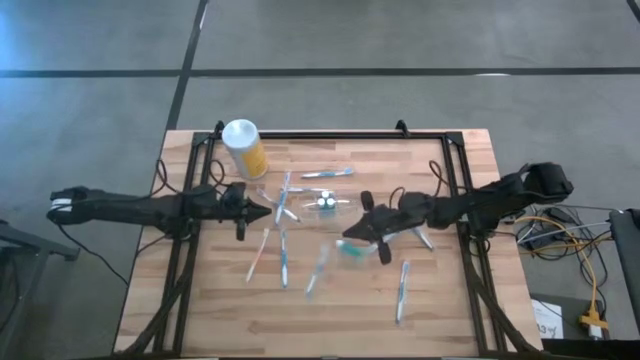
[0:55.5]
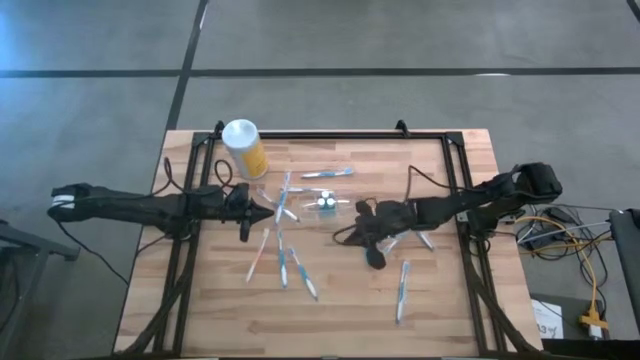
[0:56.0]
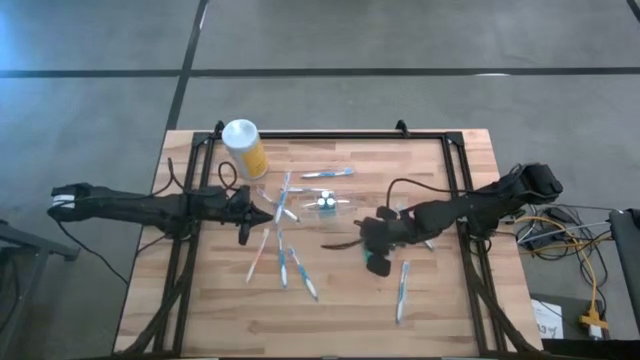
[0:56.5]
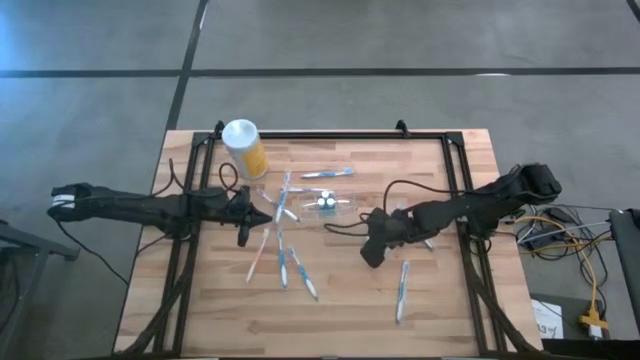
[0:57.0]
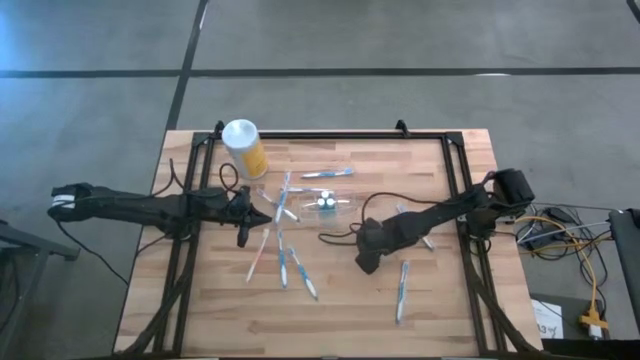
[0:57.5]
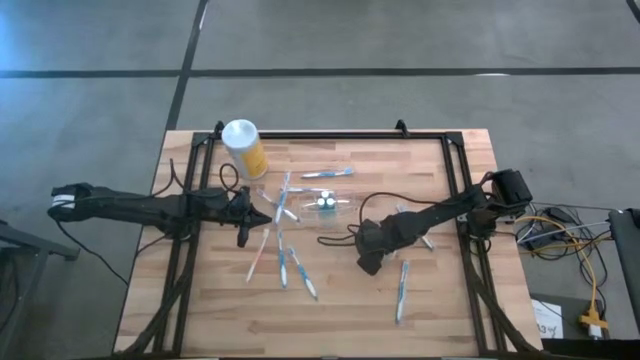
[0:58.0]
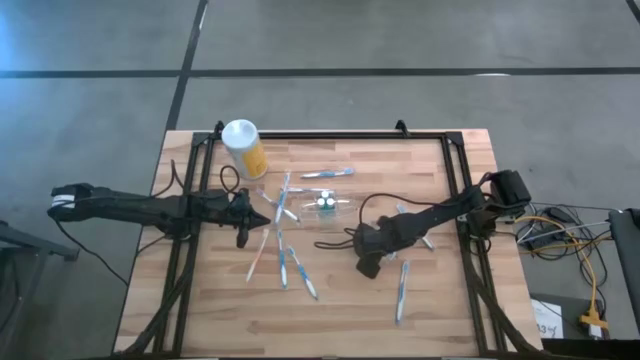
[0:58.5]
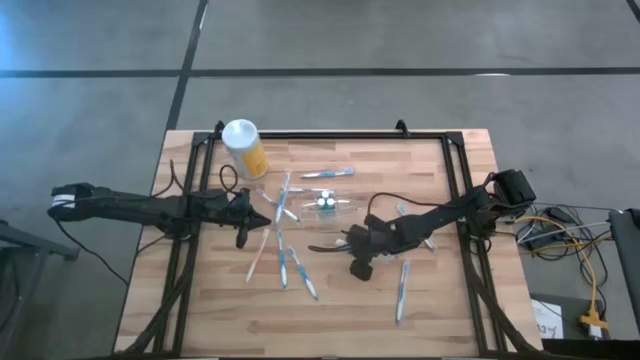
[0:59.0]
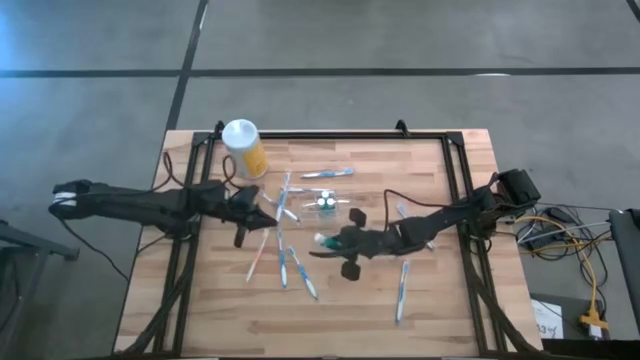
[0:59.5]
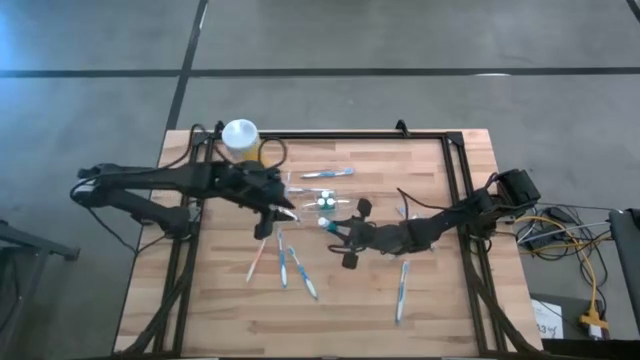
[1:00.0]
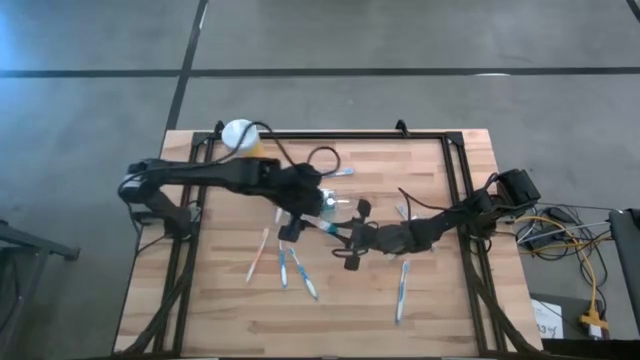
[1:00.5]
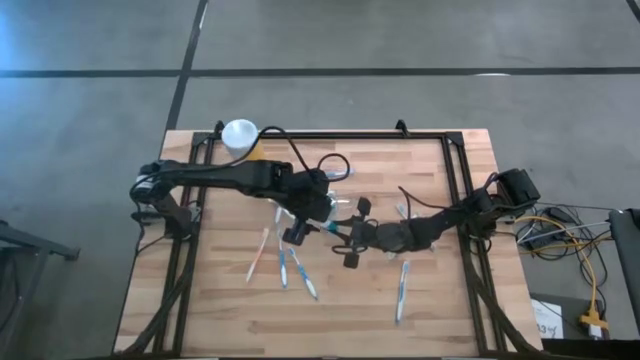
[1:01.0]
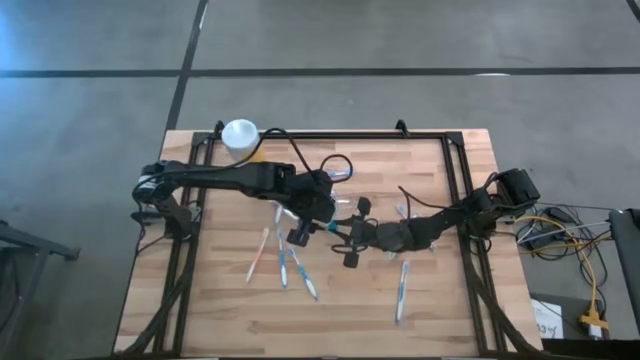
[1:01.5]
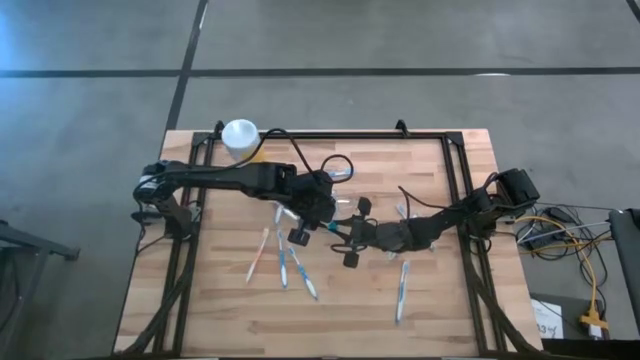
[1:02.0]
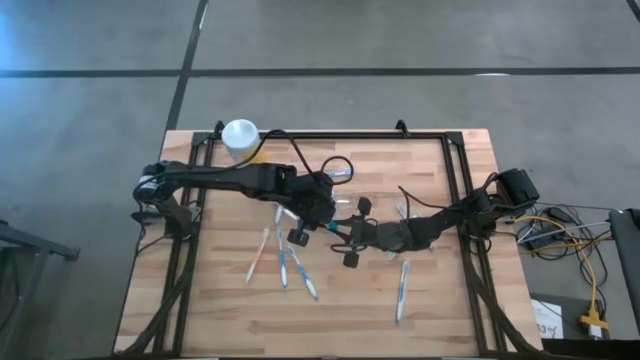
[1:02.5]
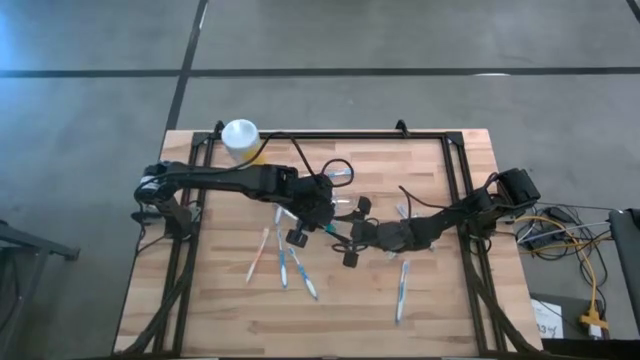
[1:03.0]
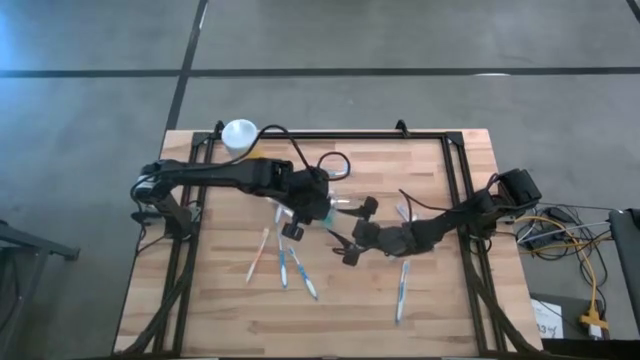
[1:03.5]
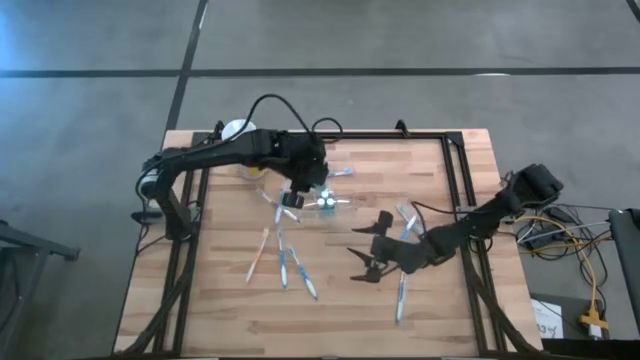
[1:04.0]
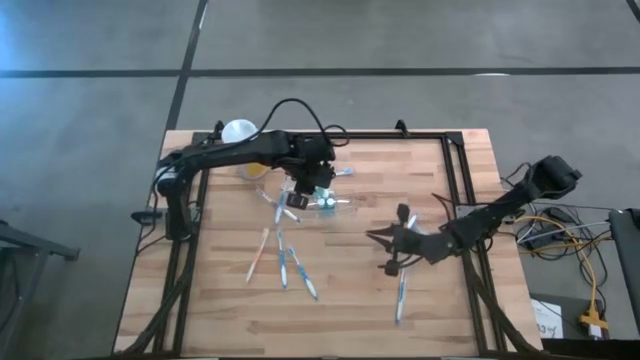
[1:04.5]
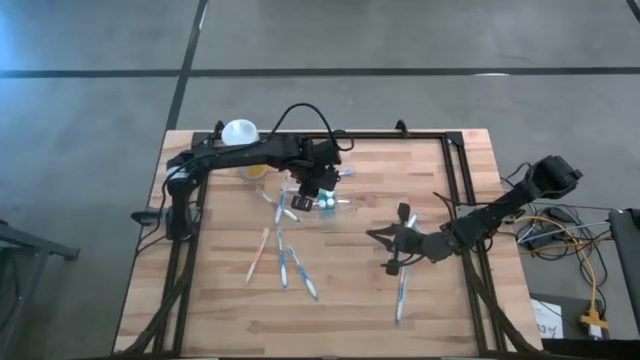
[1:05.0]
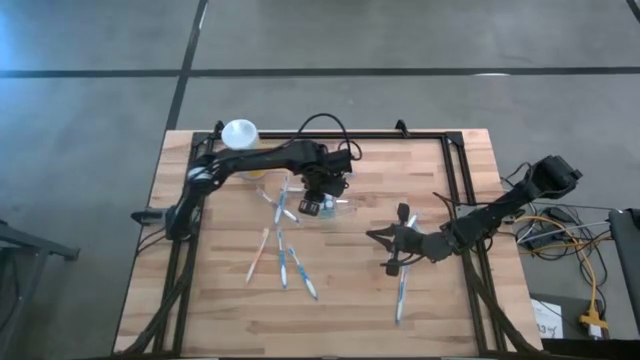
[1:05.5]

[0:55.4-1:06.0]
Task: Pick & Place toothbrushing station
Put the mouthwash into the middle section of the transparent organizer

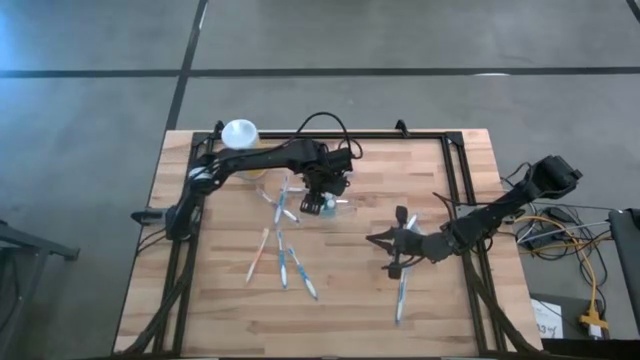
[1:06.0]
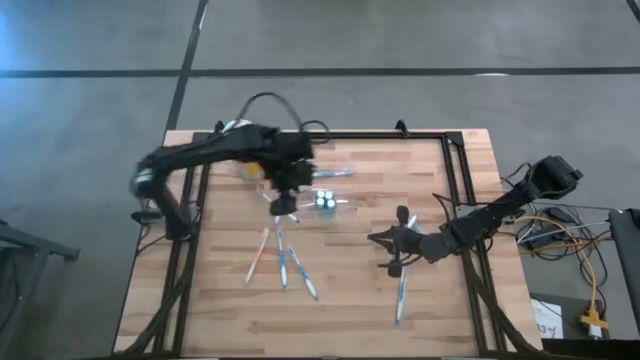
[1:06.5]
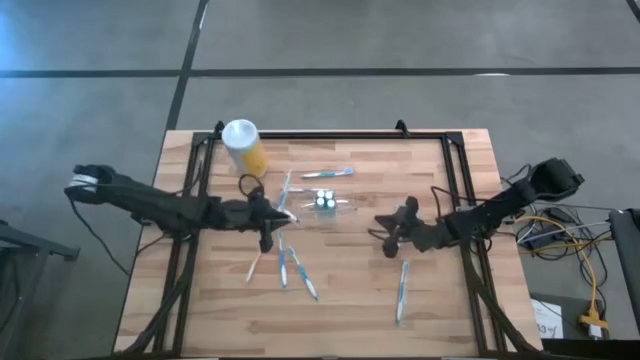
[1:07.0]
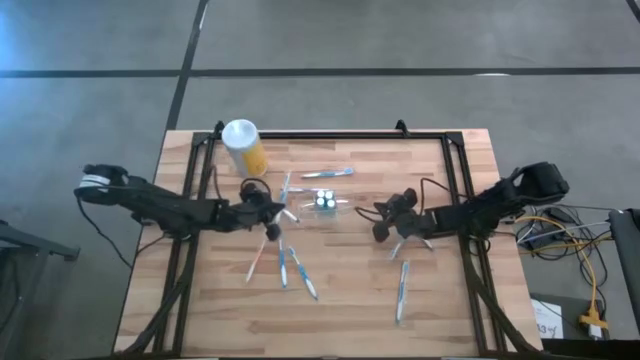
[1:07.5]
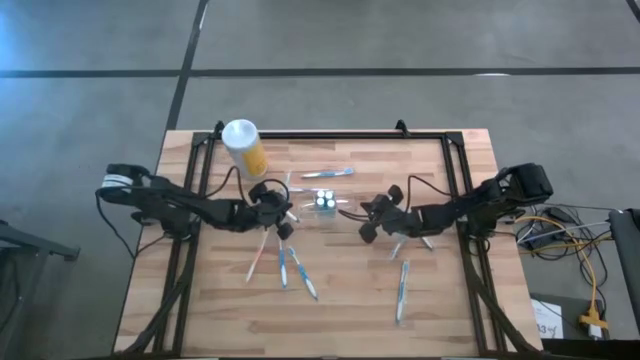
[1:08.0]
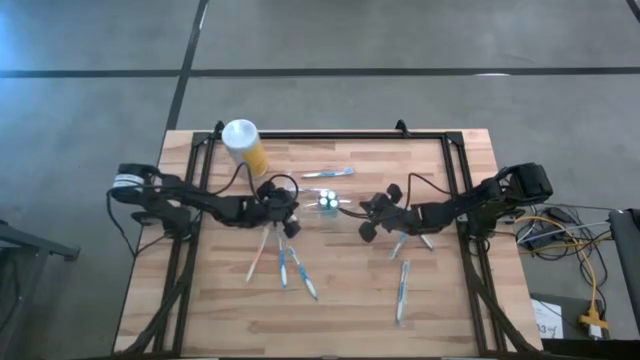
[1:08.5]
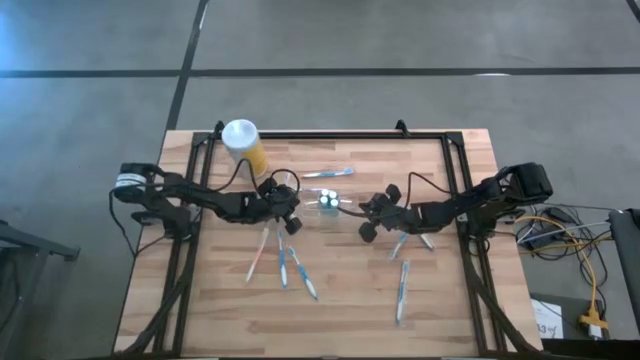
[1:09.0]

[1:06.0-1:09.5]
Adjust the transparent organizer

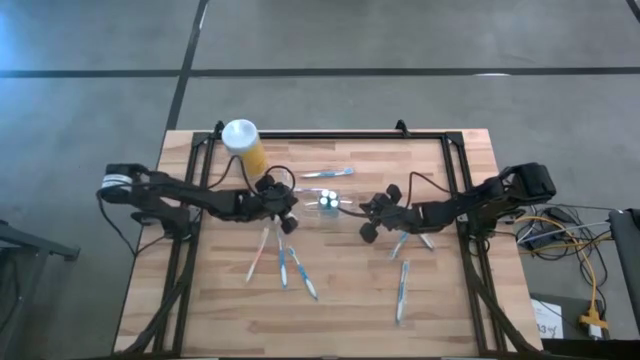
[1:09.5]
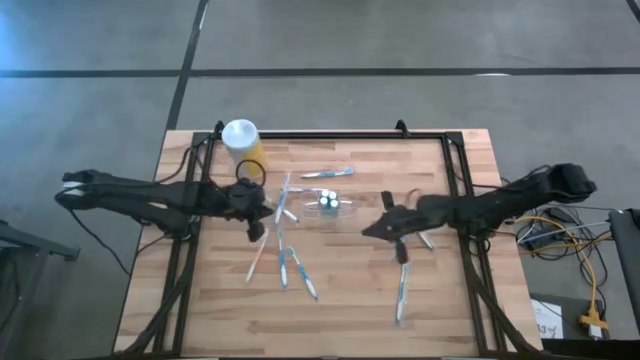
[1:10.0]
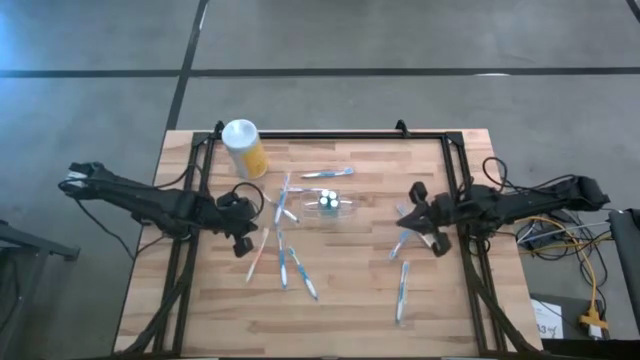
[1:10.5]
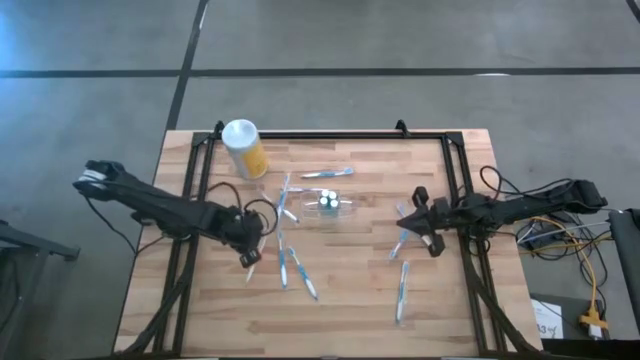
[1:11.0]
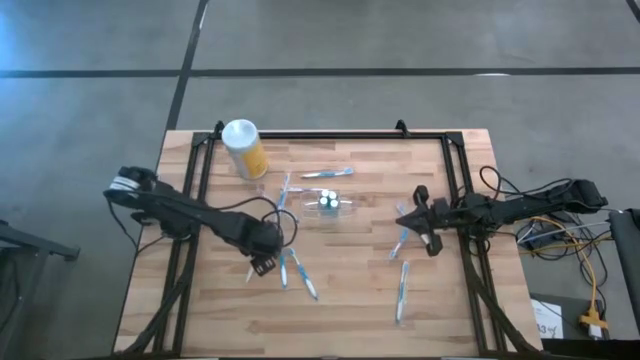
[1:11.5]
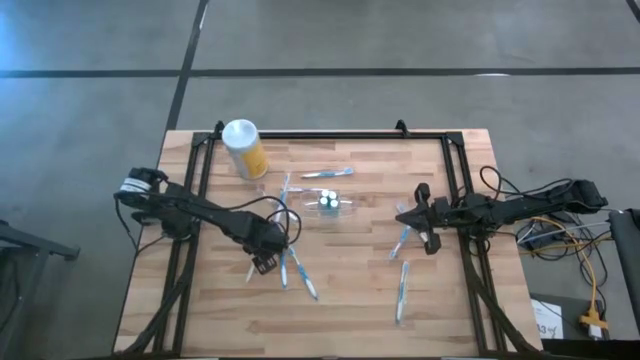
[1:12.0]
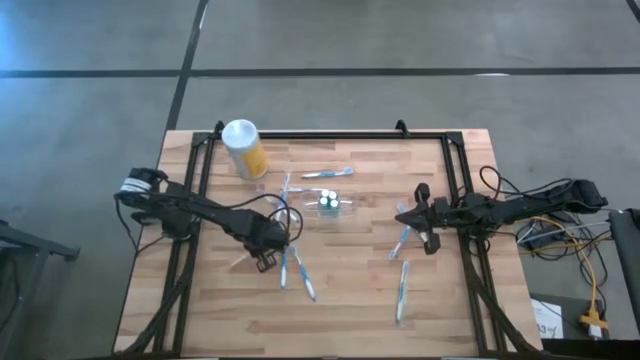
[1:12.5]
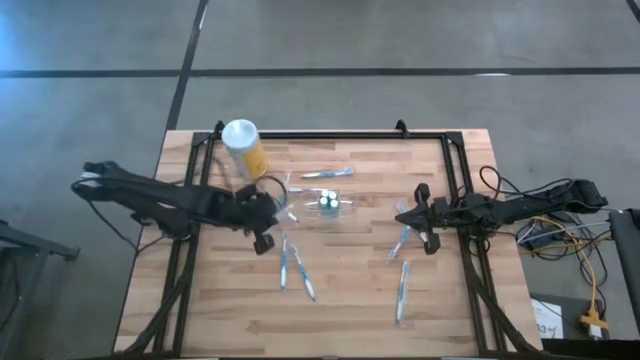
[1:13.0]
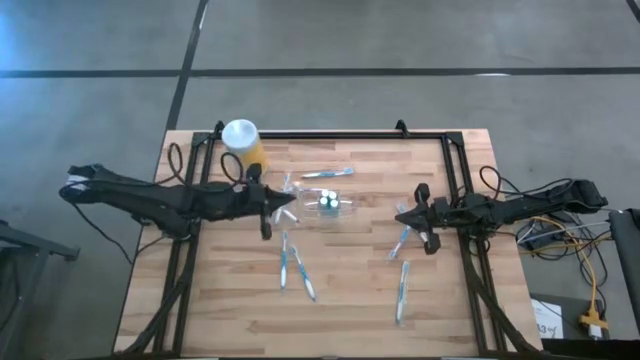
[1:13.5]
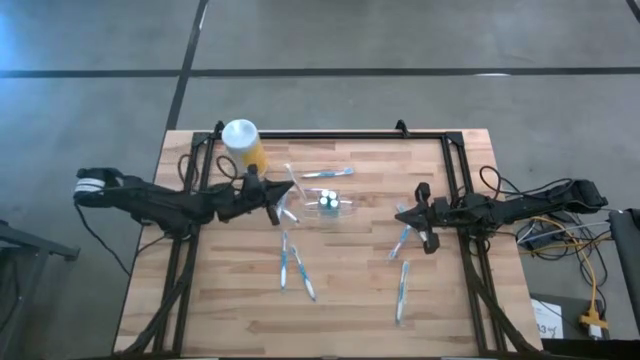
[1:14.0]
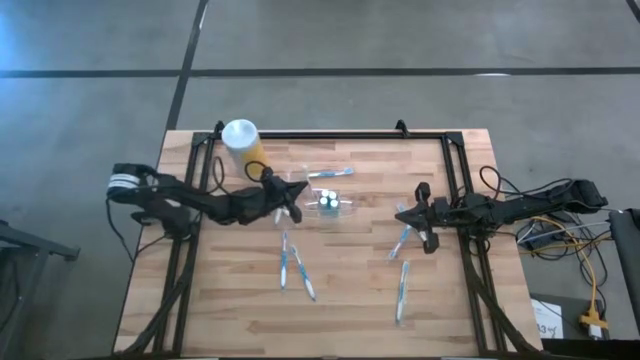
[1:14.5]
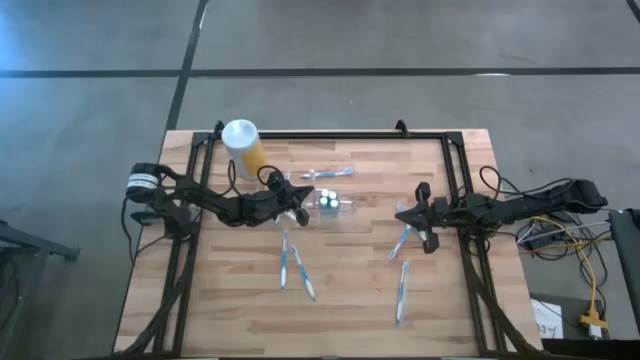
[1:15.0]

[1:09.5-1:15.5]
Put the orange toothbrush into the left section of the transparent organizer
